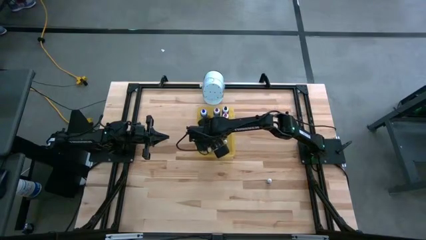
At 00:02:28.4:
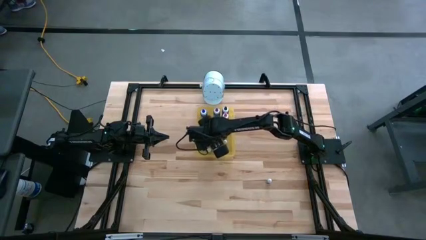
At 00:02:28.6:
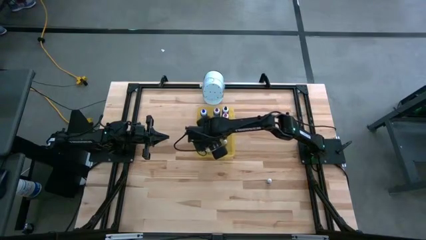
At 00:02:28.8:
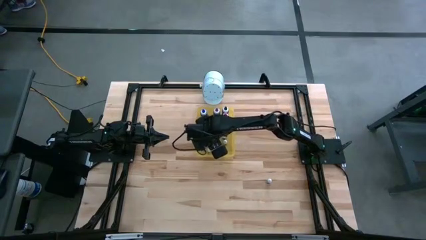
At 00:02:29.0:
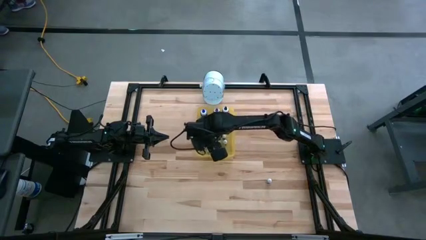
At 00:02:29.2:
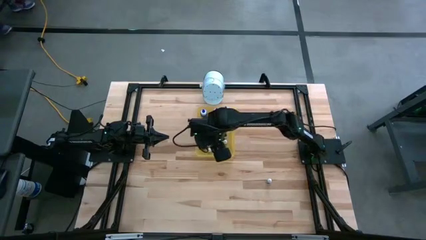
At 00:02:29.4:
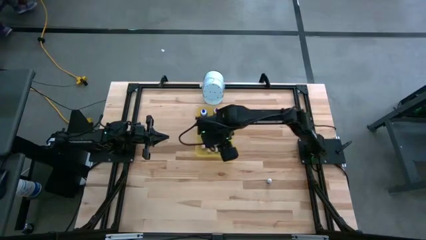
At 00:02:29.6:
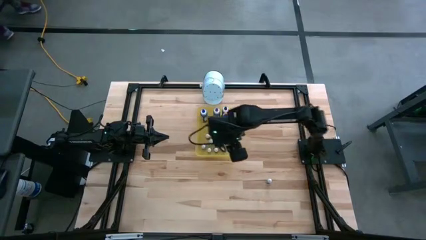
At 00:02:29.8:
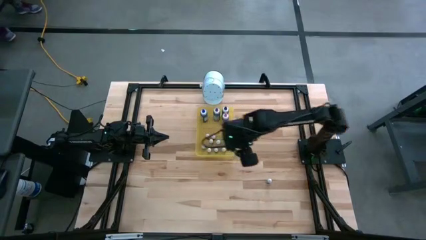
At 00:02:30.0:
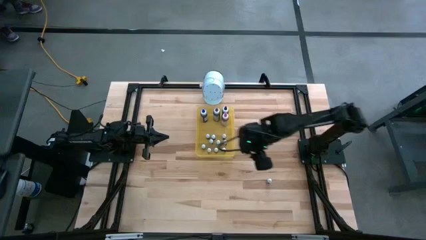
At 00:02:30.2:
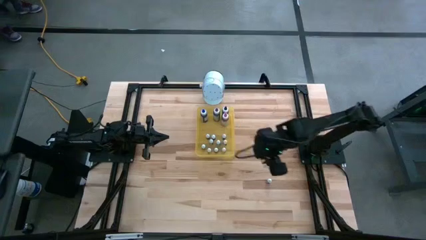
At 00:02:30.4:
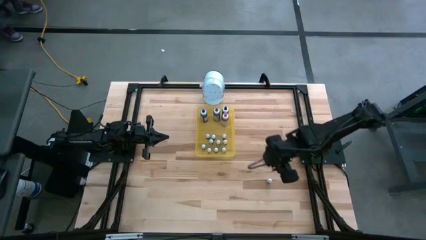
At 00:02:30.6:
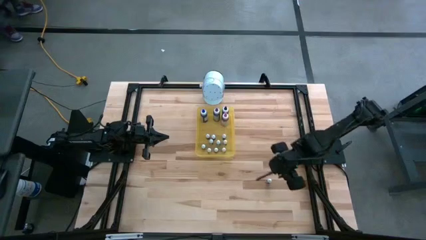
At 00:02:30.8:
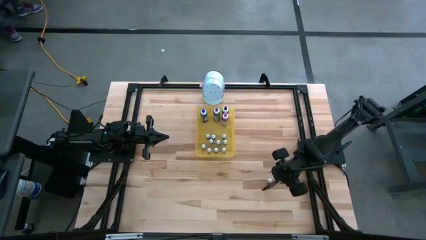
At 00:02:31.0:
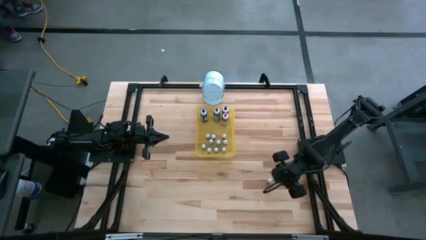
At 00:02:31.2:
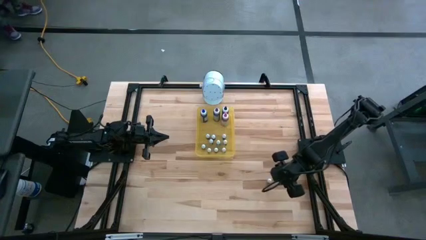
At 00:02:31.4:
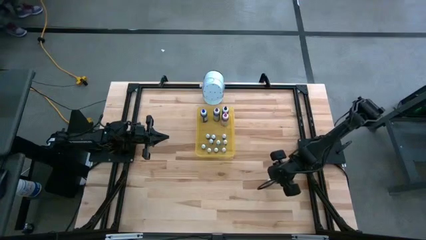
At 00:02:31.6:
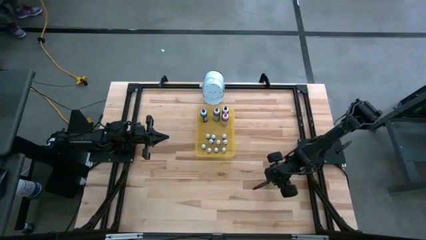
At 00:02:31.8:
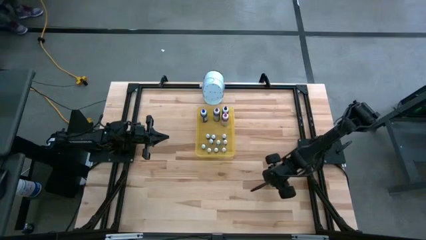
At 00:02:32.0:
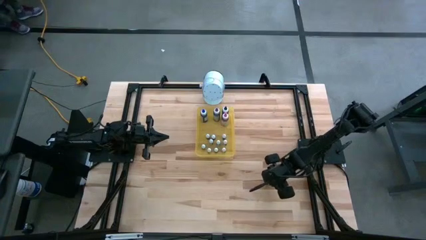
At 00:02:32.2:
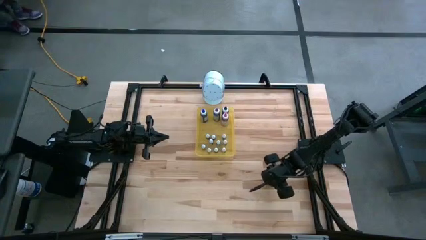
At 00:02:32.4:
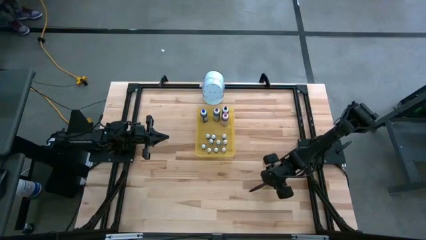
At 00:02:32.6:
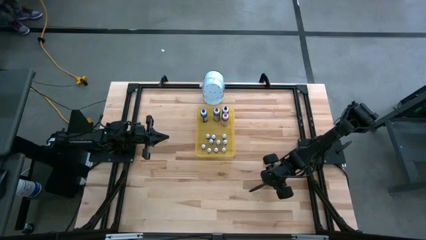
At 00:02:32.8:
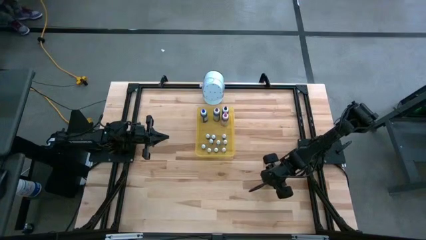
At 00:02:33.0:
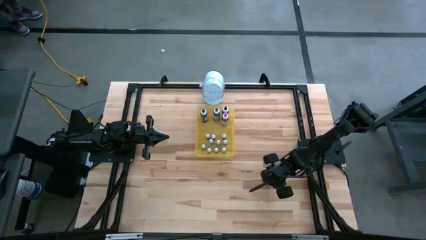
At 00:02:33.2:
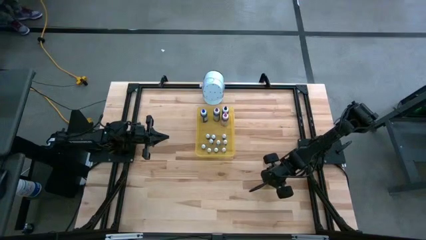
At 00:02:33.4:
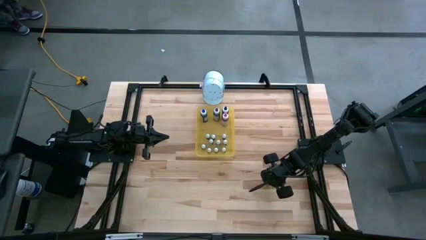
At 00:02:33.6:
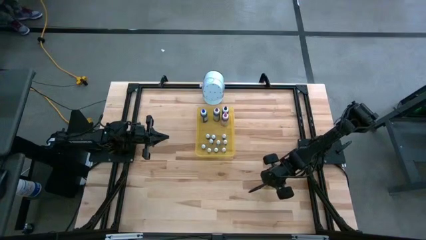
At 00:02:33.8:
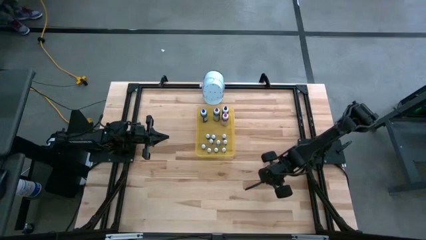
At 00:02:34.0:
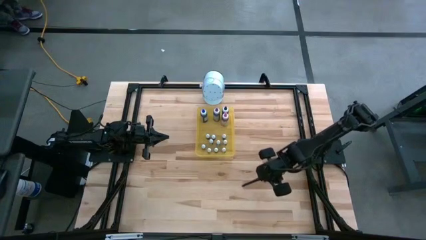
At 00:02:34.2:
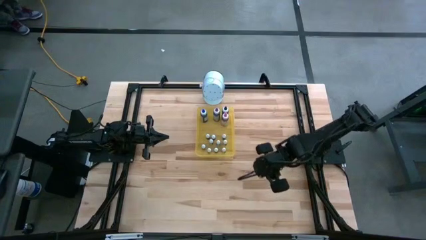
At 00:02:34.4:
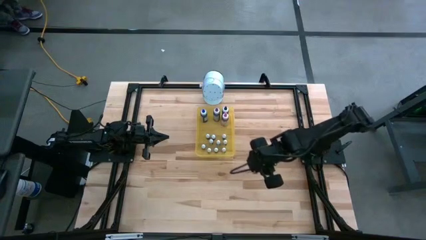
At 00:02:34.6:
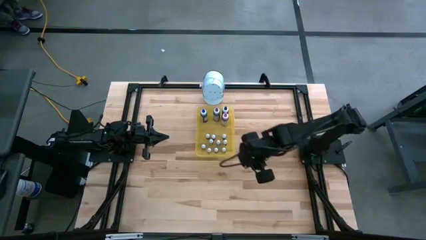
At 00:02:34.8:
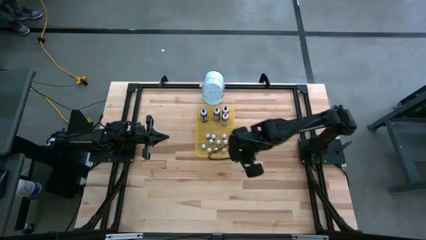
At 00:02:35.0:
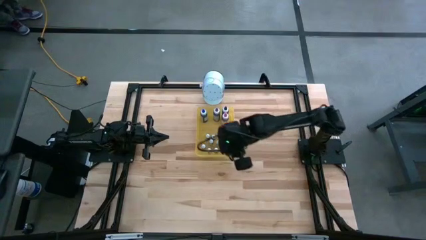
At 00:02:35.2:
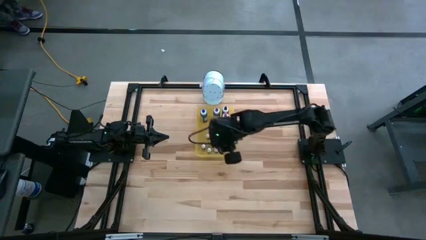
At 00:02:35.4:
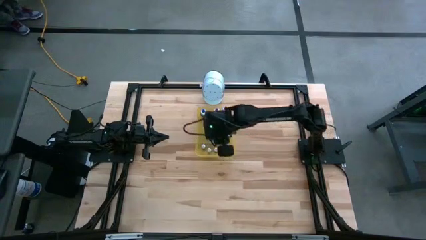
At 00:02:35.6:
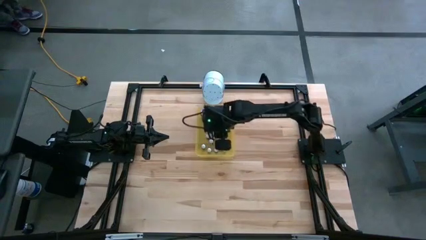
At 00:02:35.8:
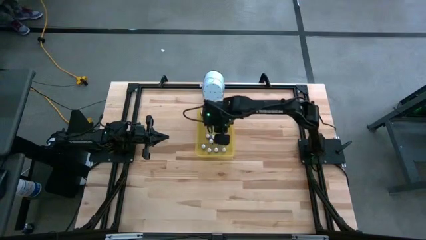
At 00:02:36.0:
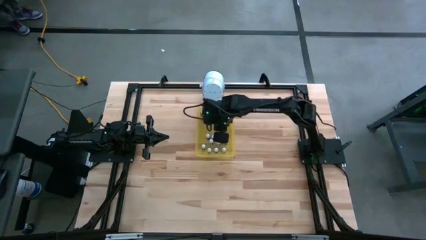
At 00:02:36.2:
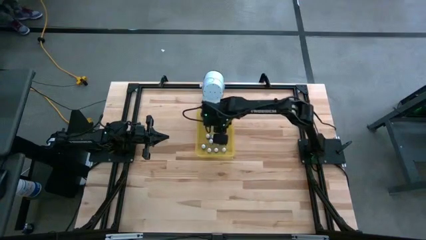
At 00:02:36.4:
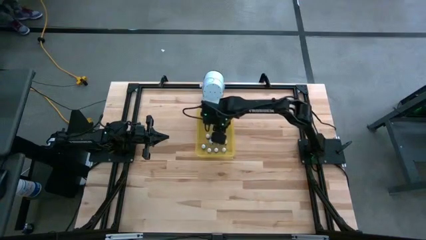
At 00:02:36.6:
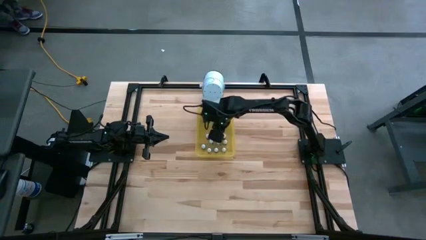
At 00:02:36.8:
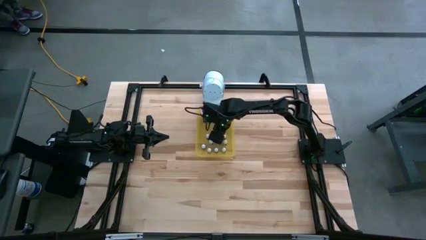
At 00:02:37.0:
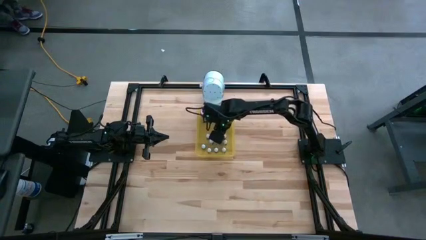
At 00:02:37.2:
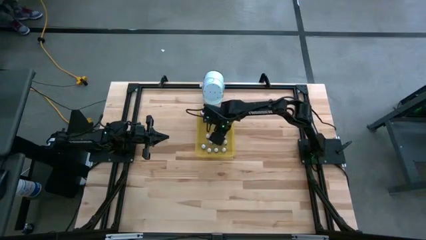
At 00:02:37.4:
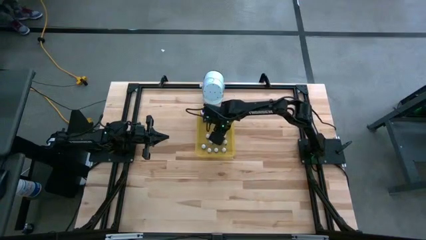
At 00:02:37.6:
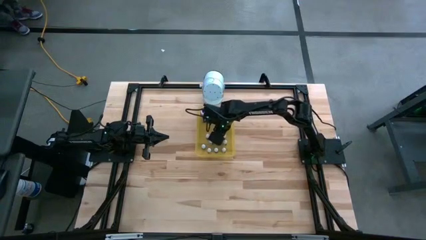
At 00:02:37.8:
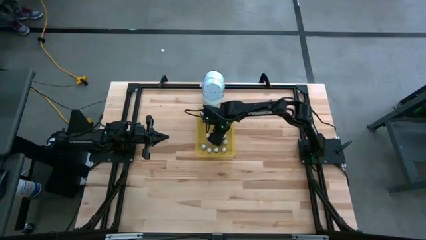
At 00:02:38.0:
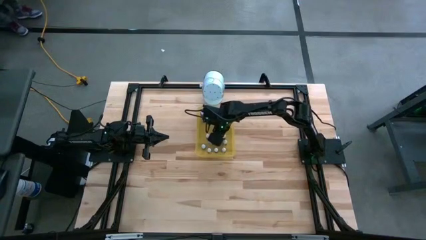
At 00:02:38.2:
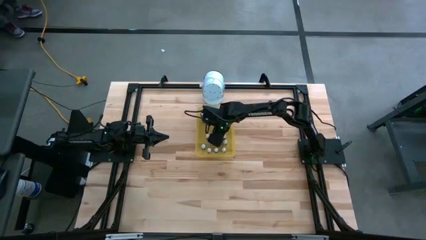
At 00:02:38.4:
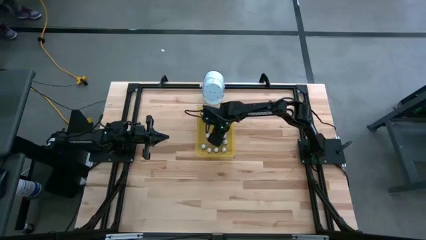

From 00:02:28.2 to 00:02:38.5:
Task: Pick & Place food coloring
Put the small purple coloring bottle in the yellow transparent bin

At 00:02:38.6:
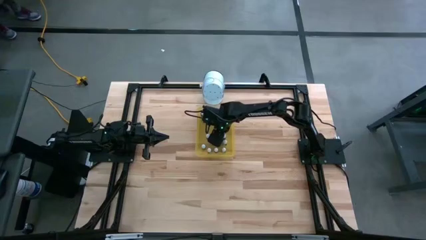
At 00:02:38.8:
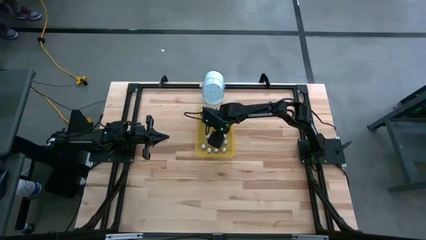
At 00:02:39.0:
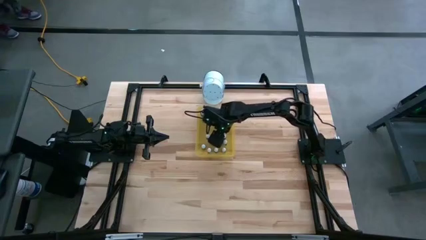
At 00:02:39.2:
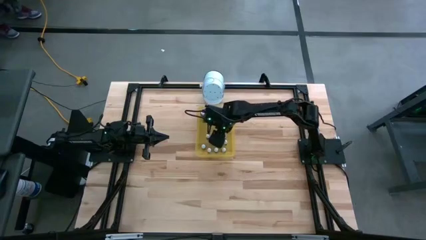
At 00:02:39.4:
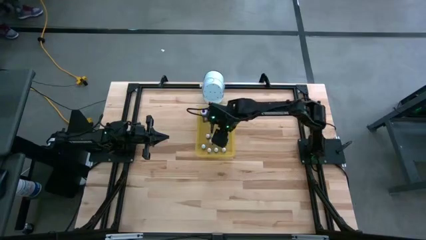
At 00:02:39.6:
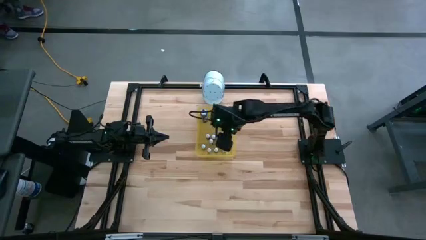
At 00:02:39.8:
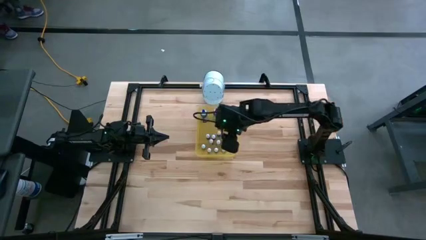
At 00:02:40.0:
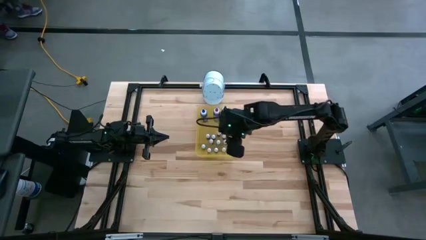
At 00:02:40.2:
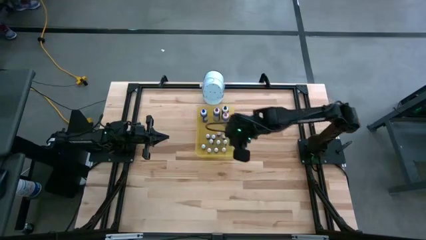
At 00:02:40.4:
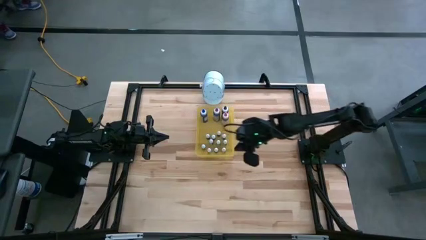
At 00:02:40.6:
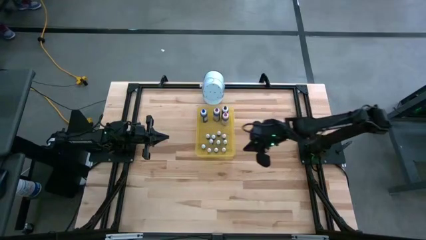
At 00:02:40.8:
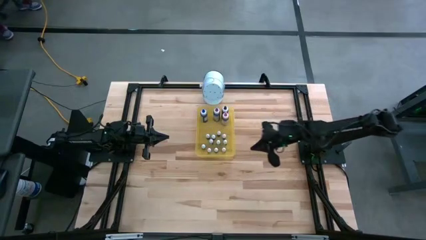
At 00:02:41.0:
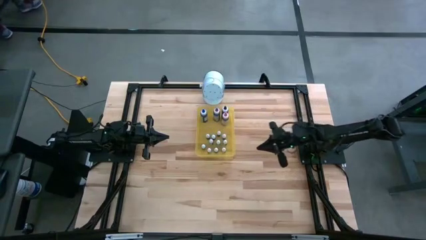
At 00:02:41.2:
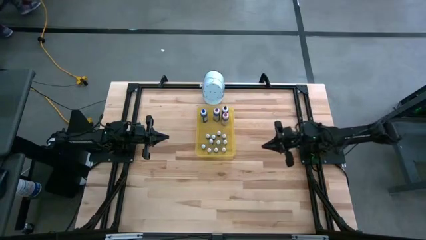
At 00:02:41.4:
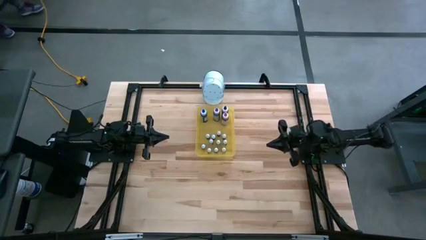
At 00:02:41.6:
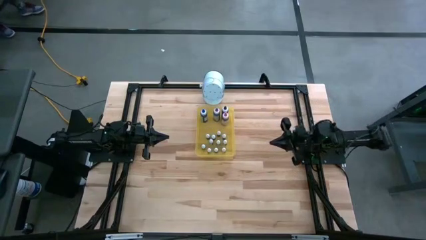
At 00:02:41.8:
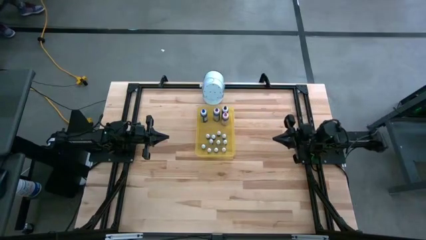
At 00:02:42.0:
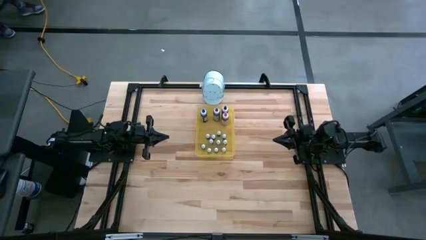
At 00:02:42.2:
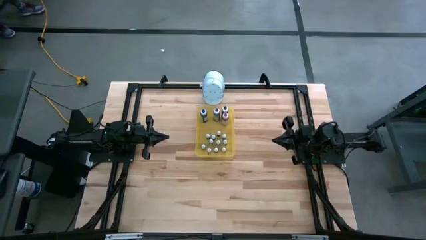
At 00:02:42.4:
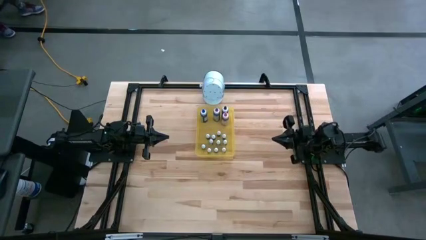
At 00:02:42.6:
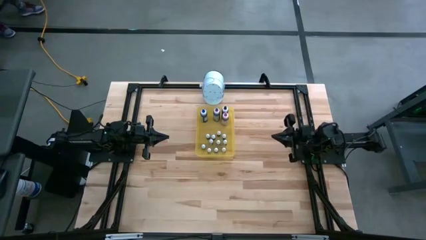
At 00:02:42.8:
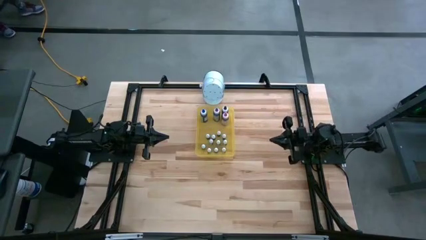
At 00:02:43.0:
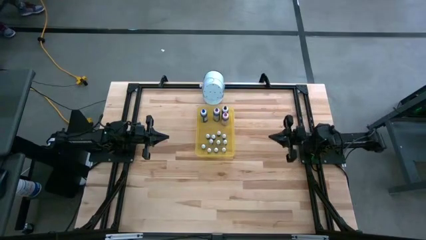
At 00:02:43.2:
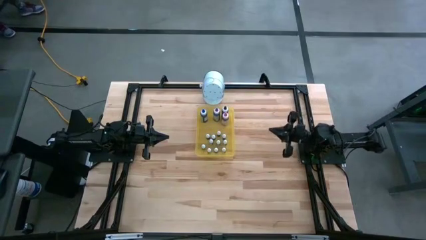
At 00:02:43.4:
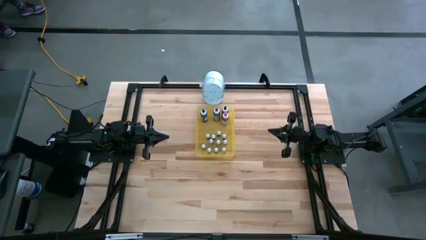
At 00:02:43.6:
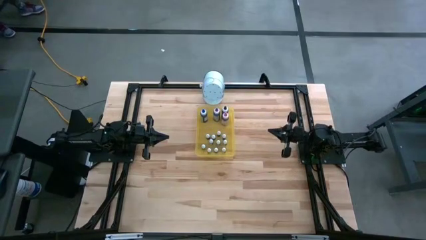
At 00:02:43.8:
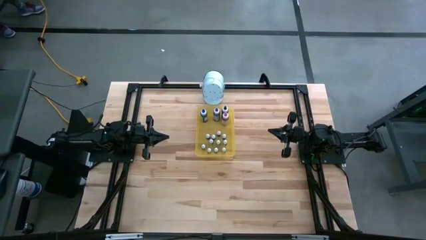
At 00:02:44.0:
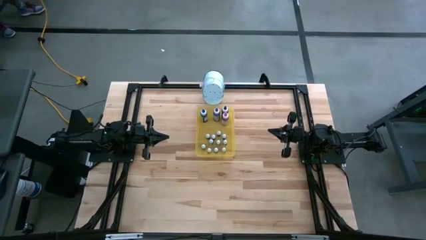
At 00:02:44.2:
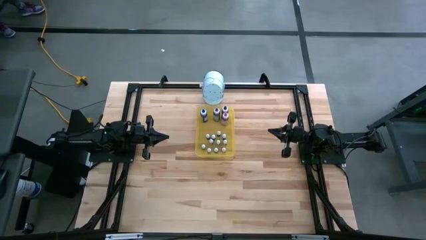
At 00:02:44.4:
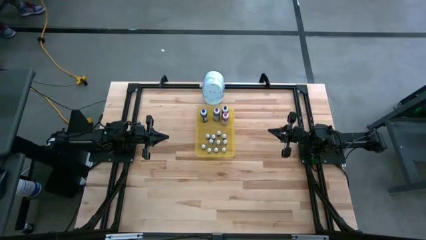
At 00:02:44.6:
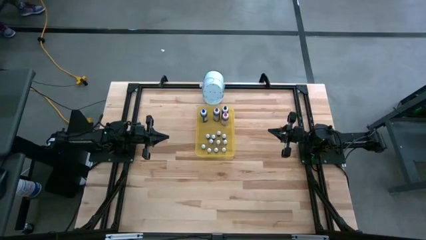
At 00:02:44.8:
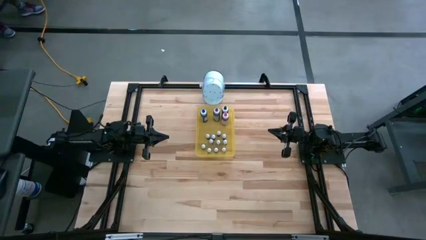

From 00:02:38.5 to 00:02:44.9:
Return to Home Position
